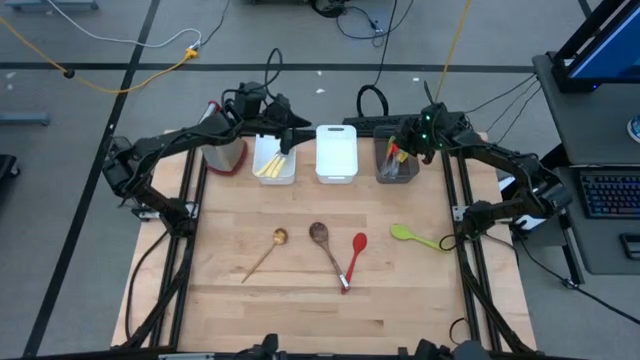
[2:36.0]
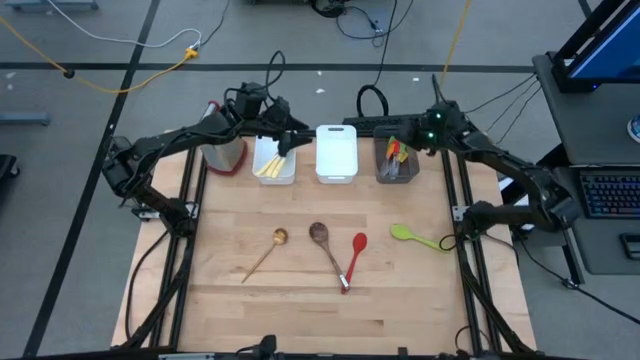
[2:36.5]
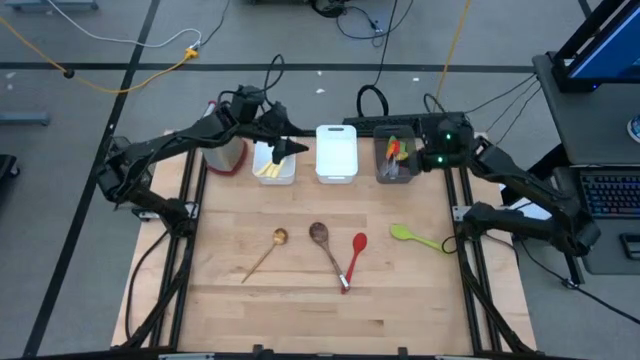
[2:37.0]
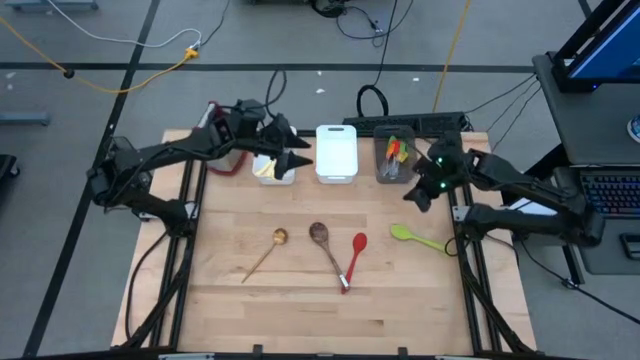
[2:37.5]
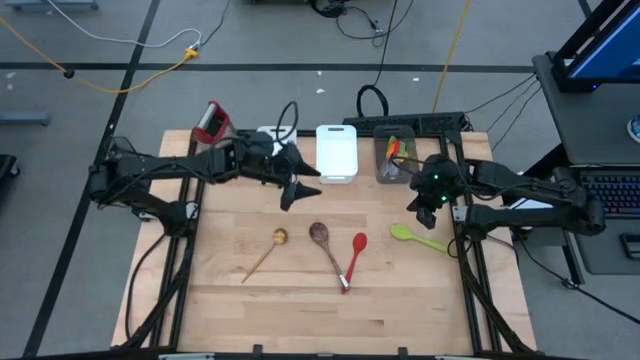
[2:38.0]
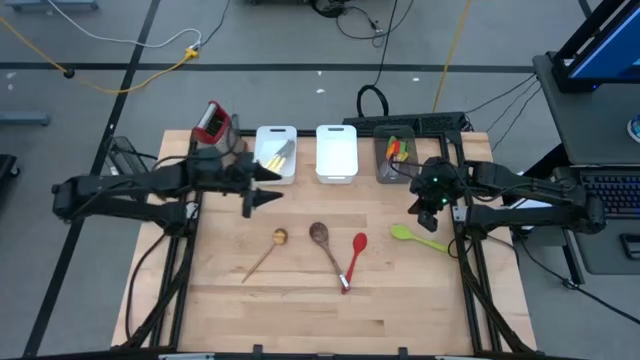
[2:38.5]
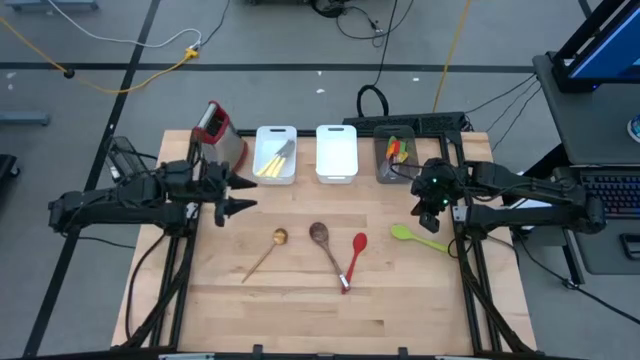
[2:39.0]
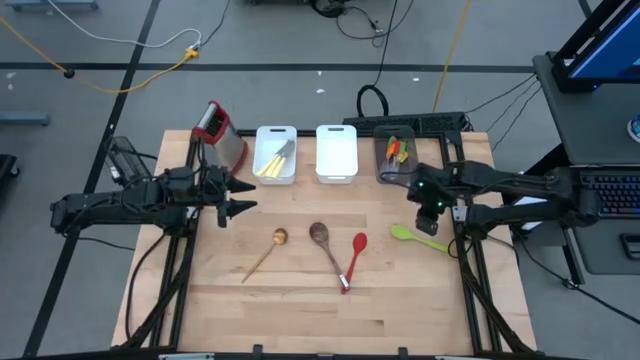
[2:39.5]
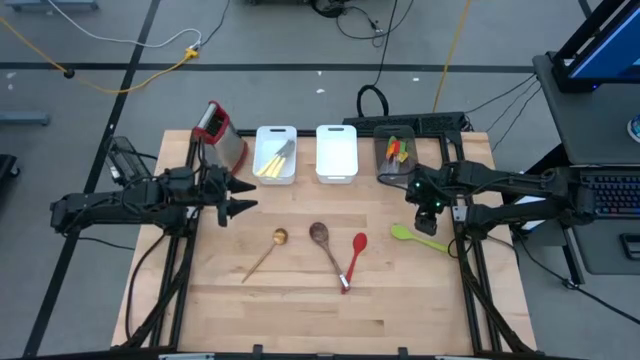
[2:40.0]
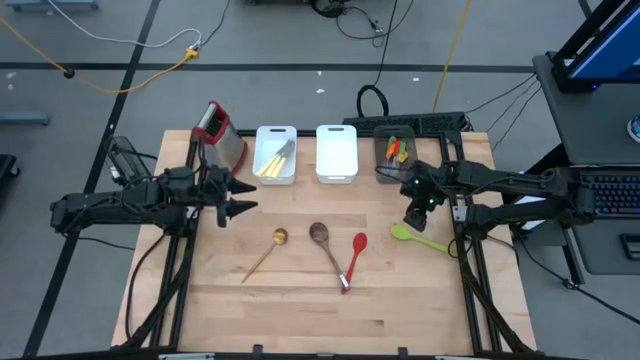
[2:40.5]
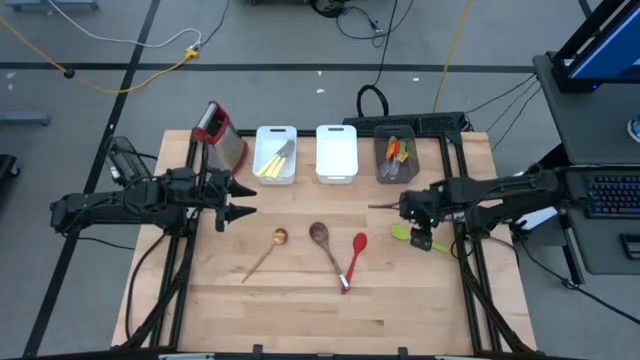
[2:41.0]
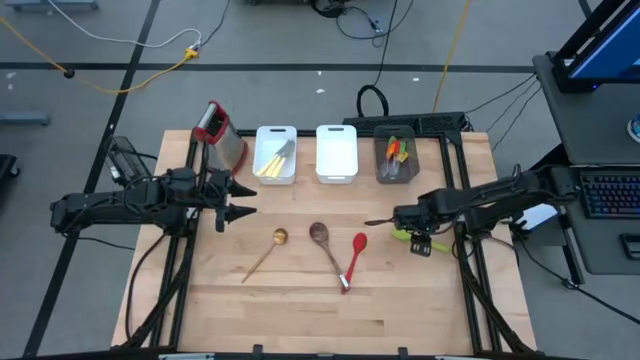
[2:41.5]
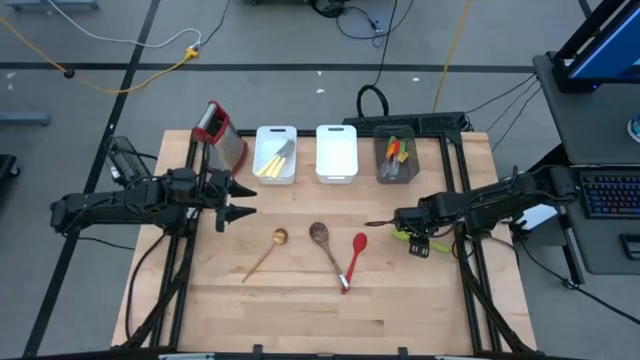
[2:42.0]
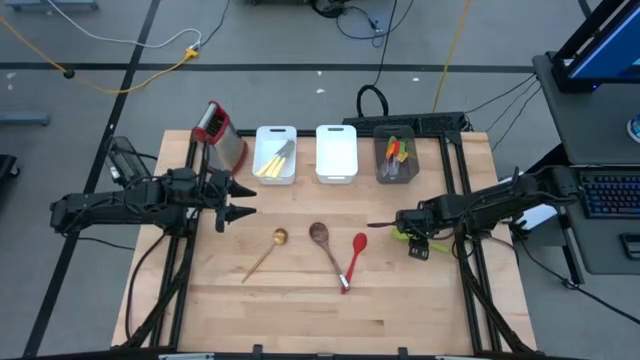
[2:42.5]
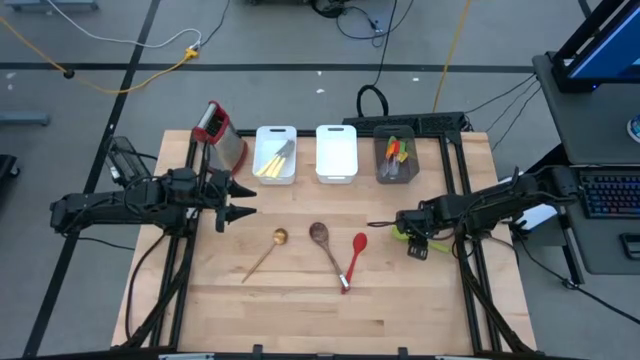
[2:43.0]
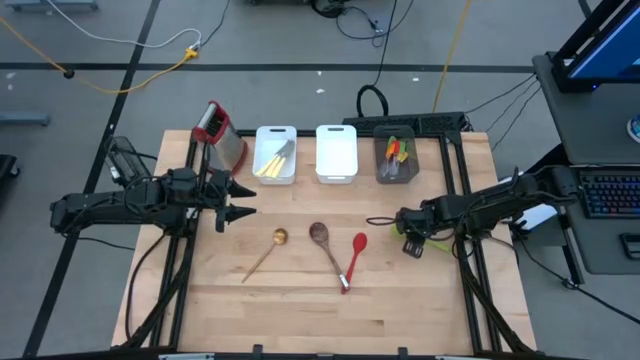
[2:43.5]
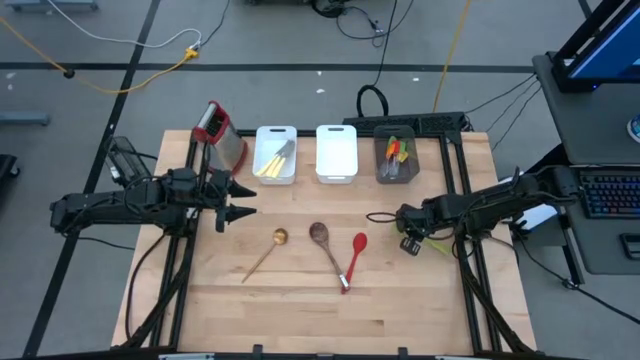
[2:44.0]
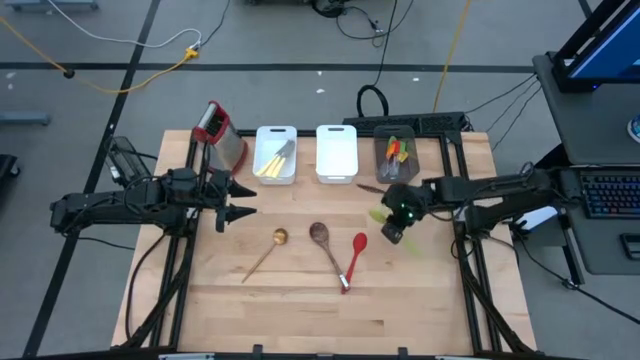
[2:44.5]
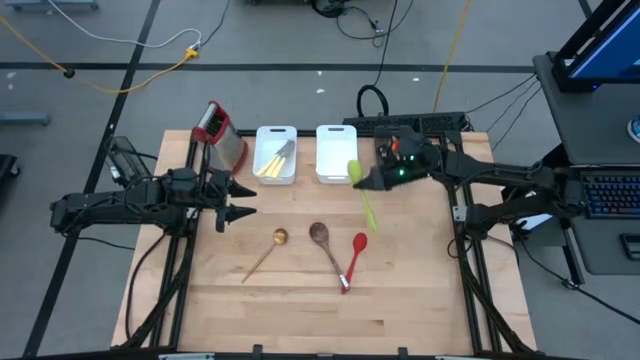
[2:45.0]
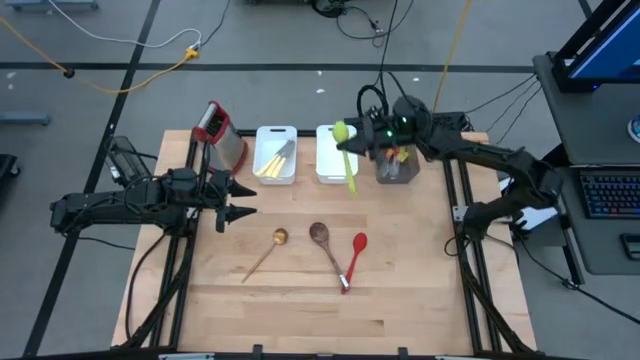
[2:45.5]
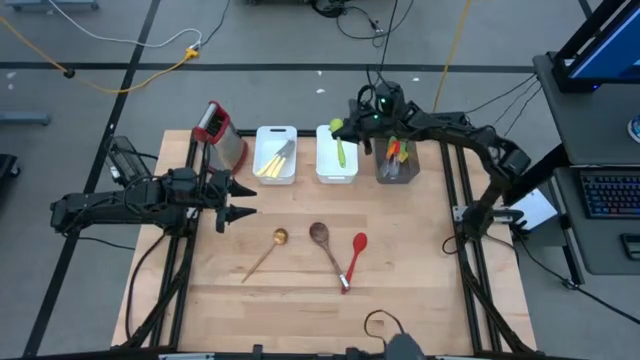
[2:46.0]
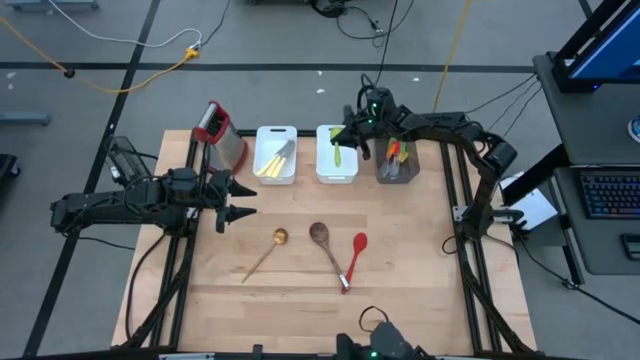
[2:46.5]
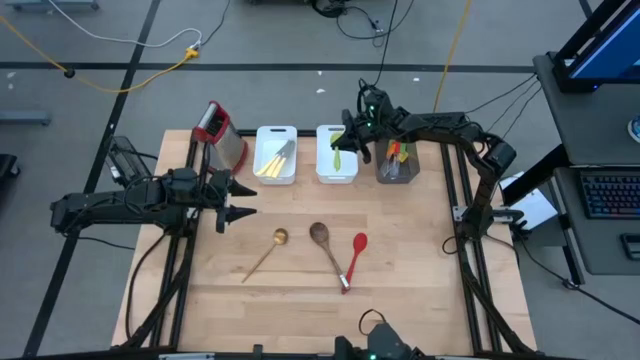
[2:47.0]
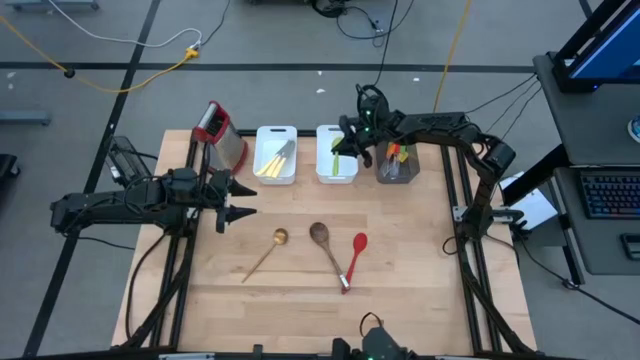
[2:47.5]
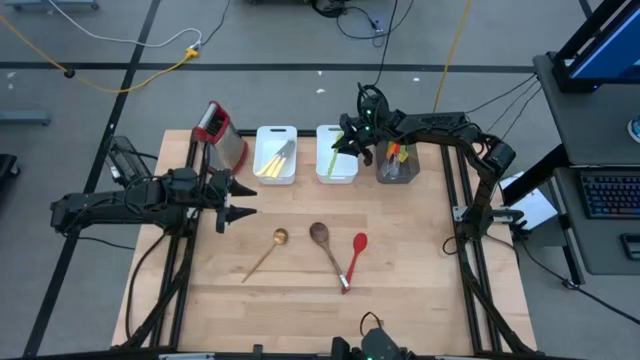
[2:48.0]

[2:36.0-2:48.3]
Task: Pick & Place Kitchen Items
Put the green serving spoon into the right white bin

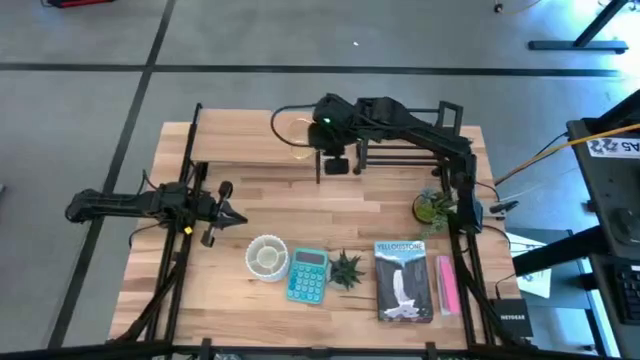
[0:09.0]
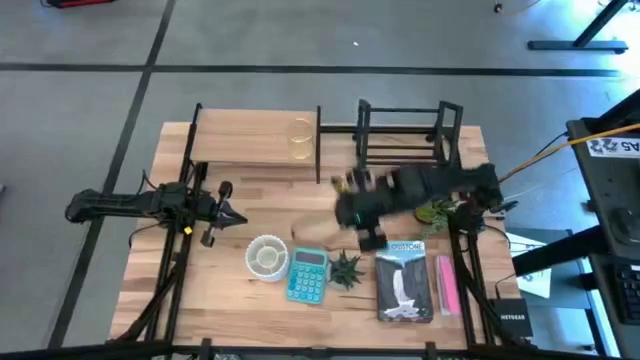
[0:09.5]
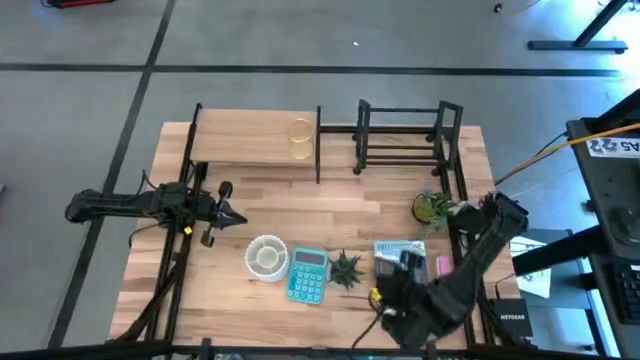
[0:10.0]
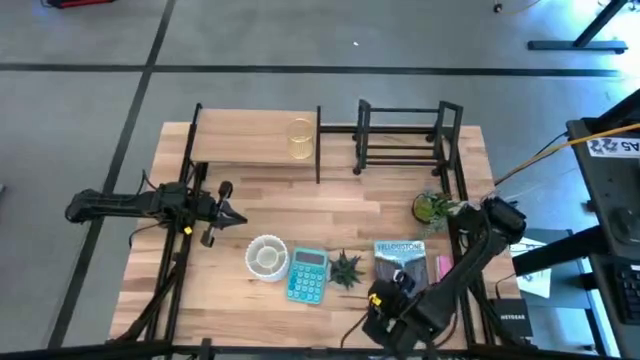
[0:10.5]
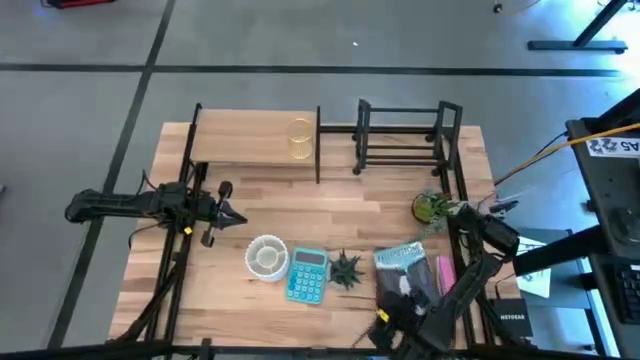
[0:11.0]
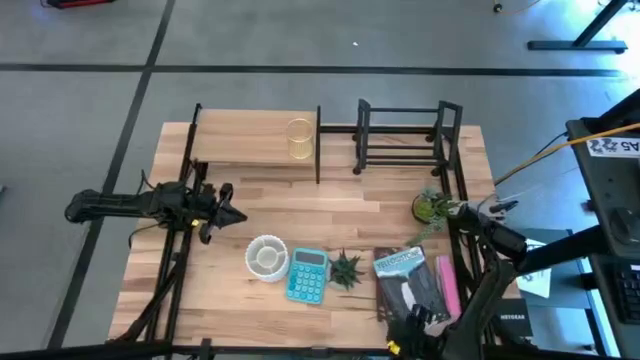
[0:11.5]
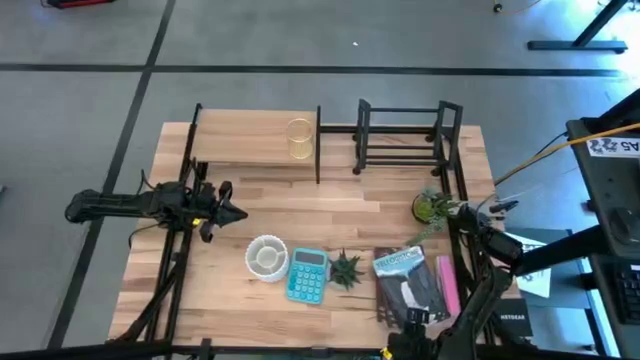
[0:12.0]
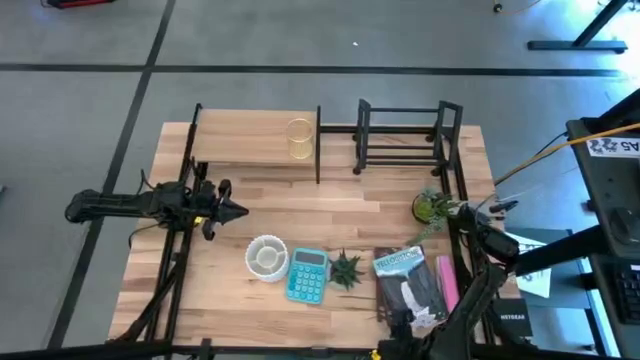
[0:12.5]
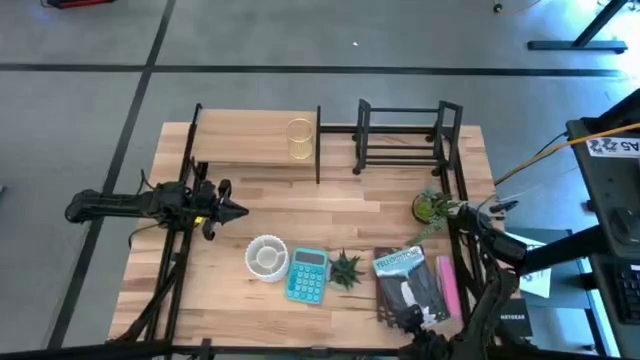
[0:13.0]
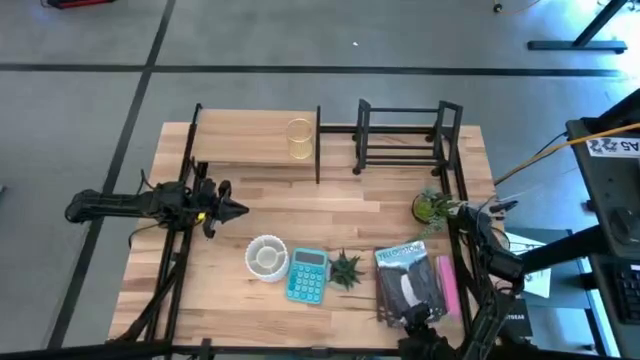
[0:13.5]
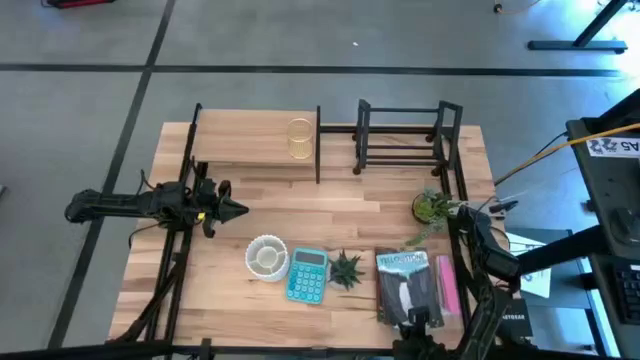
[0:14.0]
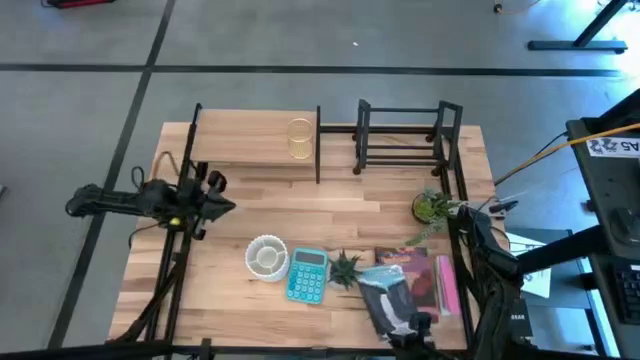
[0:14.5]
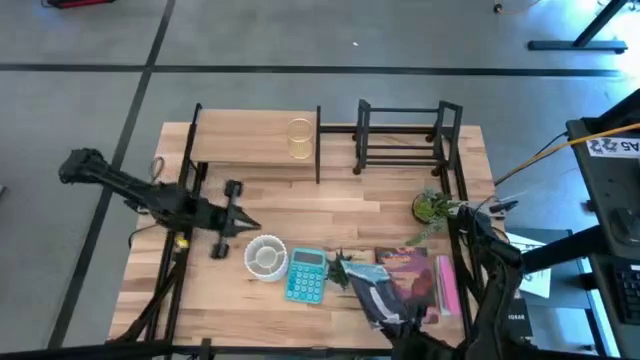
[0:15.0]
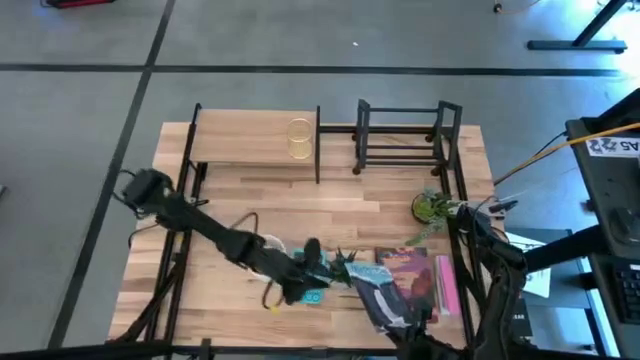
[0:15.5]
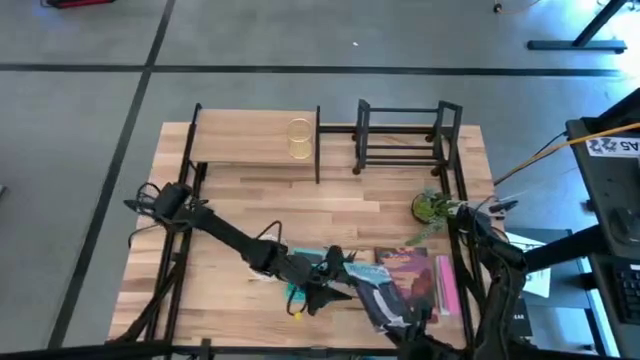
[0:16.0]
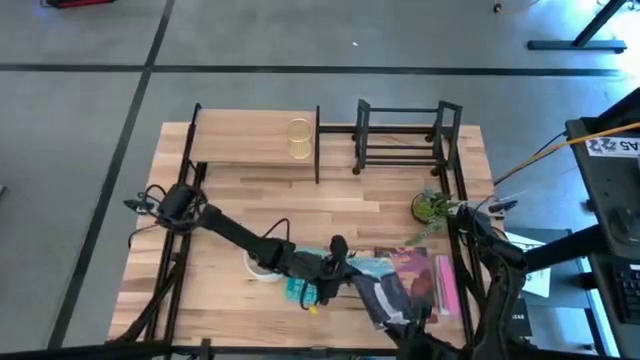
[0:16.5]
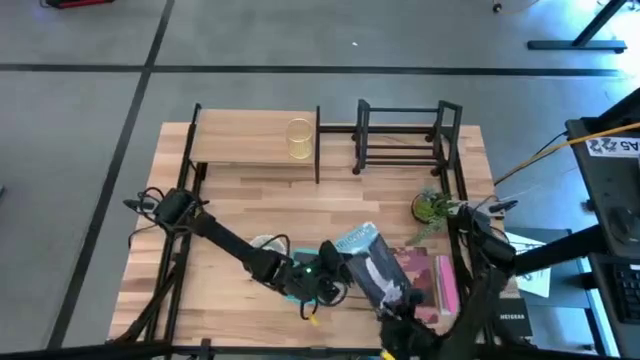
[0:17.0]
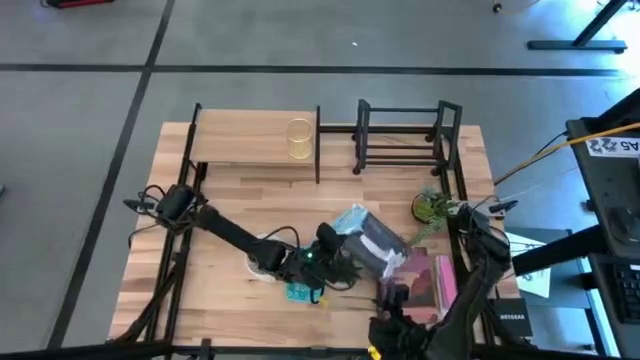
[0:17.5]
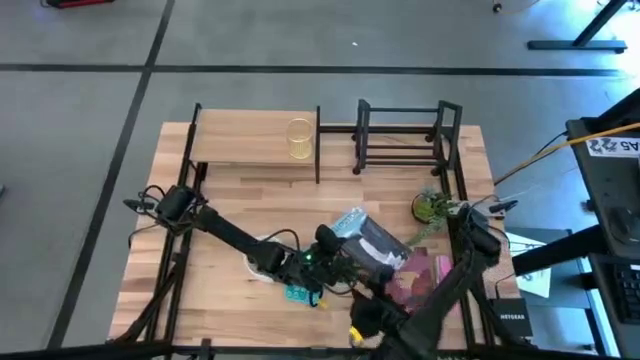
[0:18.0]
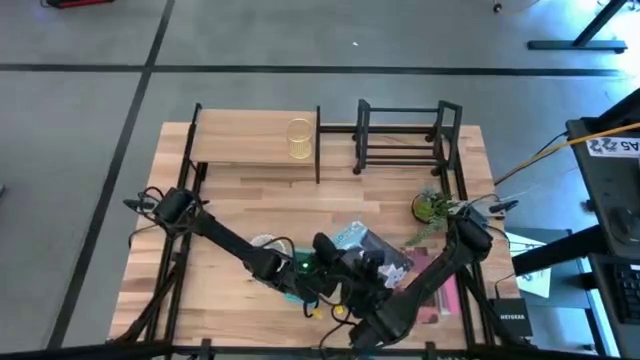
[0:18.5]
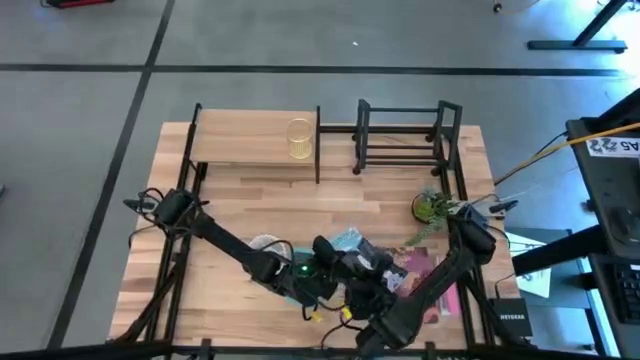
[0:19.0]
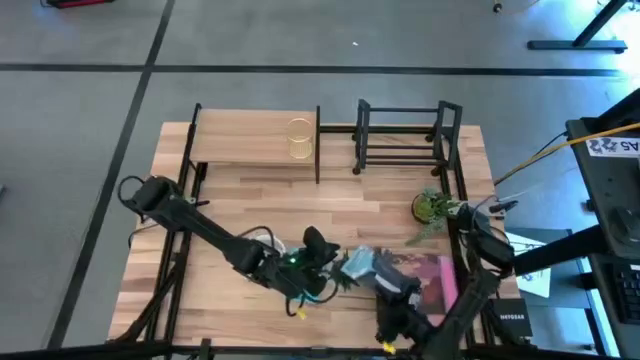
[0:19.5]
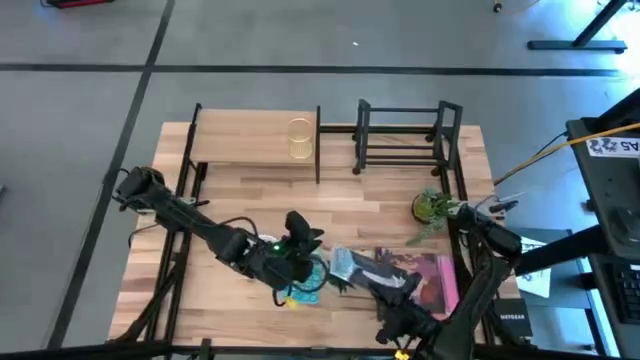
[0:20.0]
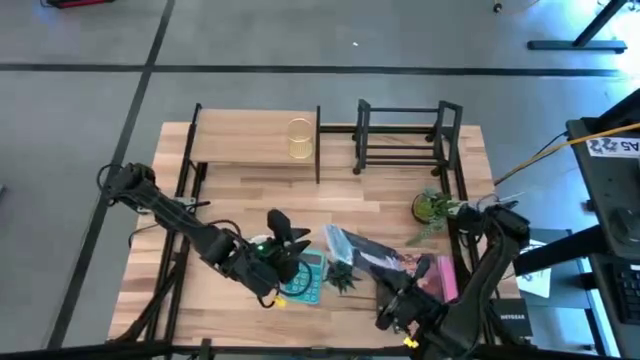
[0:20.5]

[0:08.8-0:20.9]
Task: Stock shelves
Put the blue book on the bookshelf
